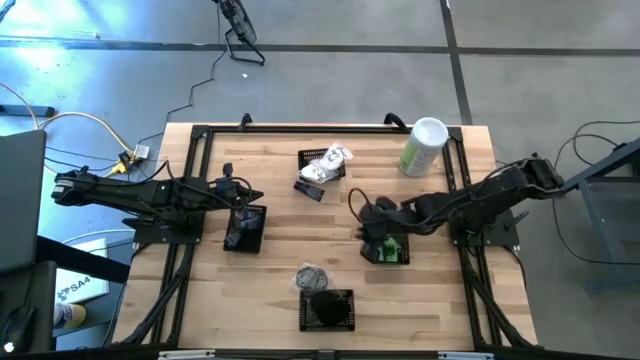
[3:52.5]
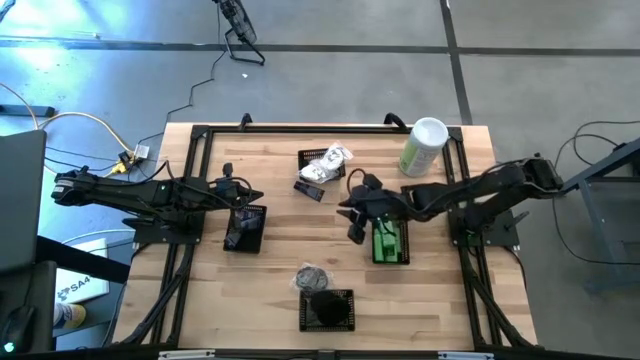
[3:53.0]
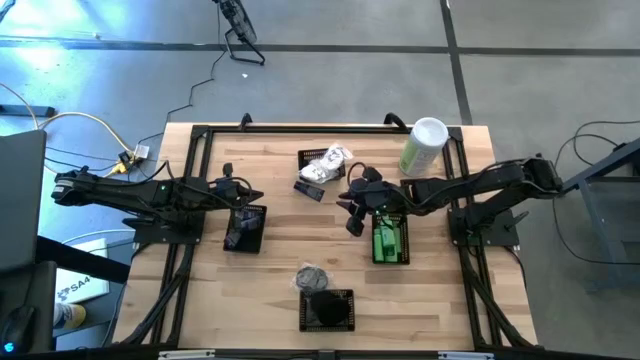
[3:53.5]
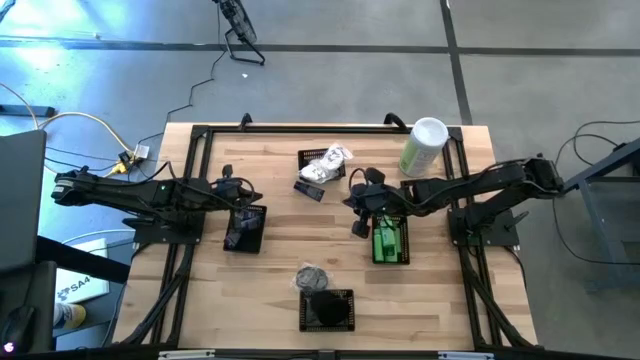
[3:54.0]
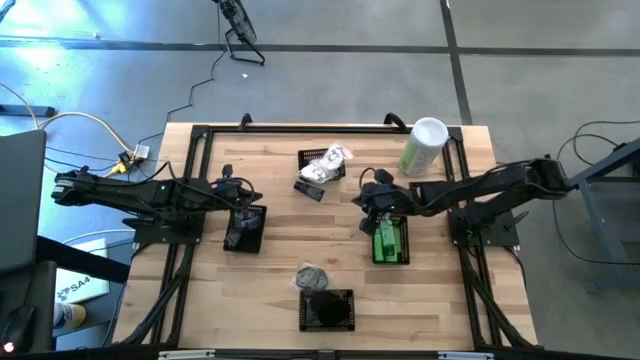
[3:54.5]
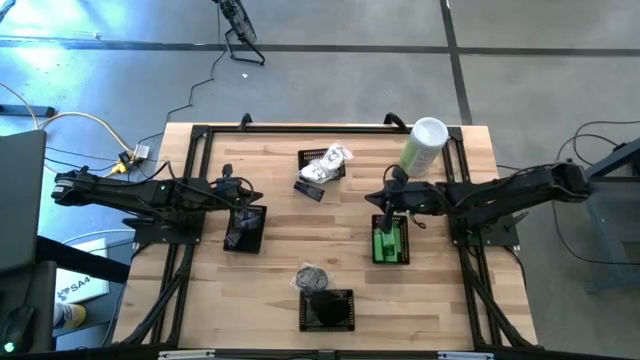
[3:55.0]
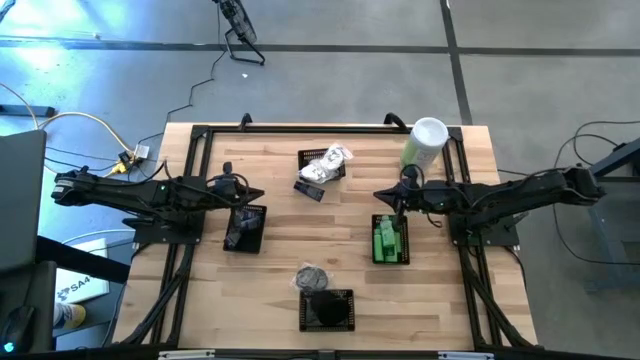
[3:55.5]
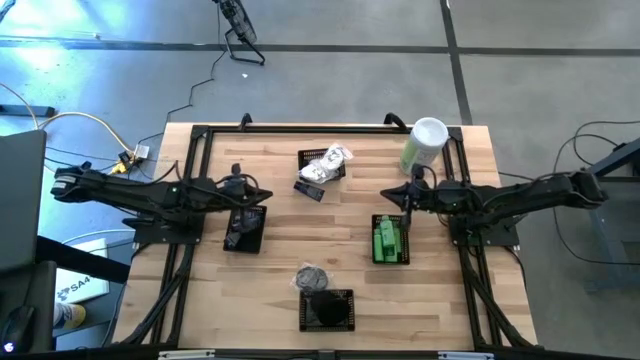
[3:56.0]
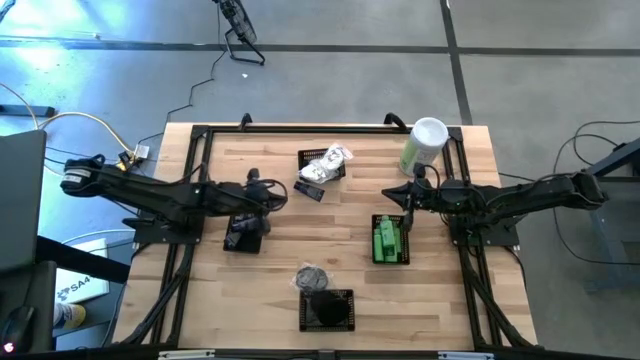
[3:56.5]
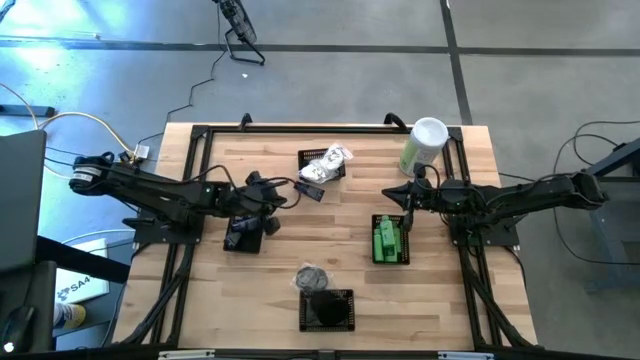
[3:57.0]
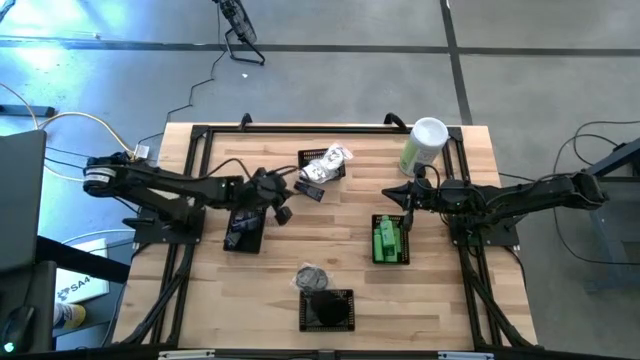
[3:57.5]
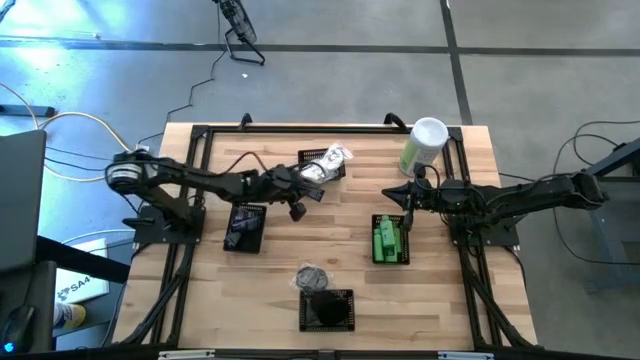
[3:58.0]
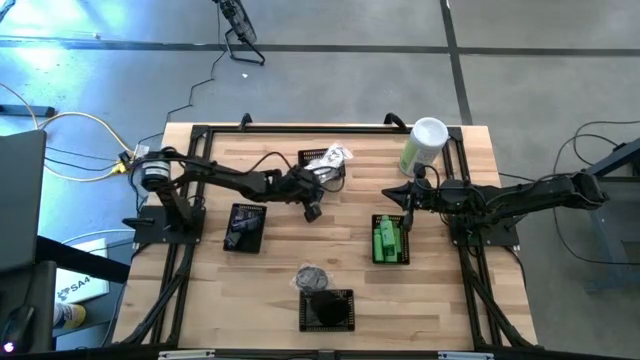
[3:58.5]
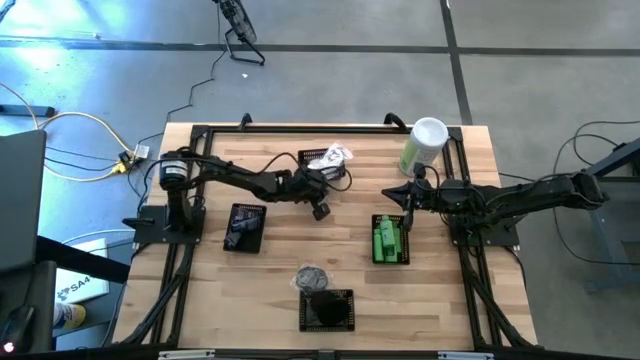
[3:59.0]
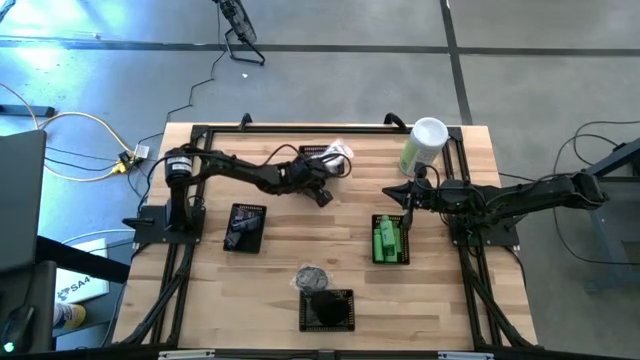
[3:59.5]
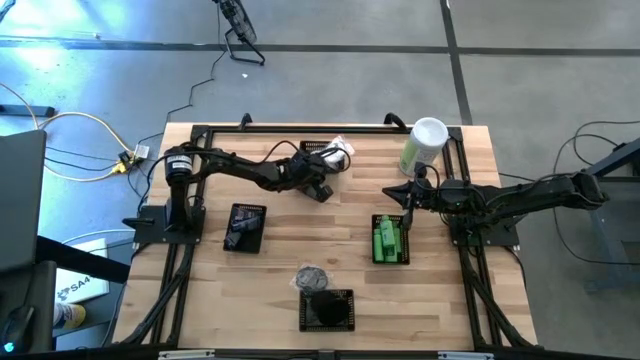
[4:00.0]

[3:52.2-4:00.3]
Task: Pick & Place Travel size toiletries
Adjust the top middle black bin on the table

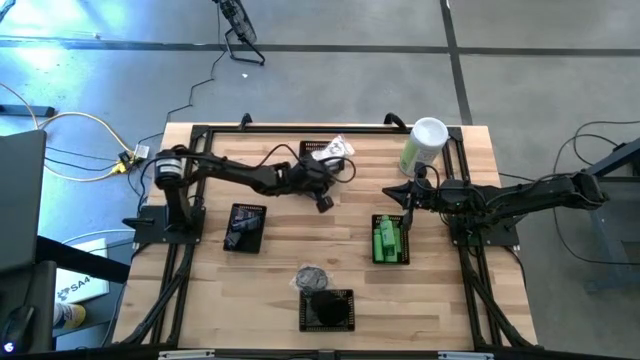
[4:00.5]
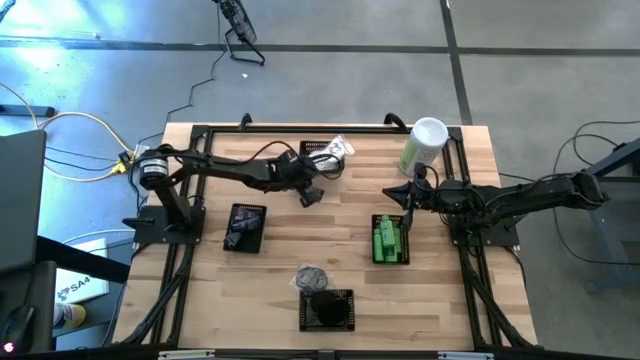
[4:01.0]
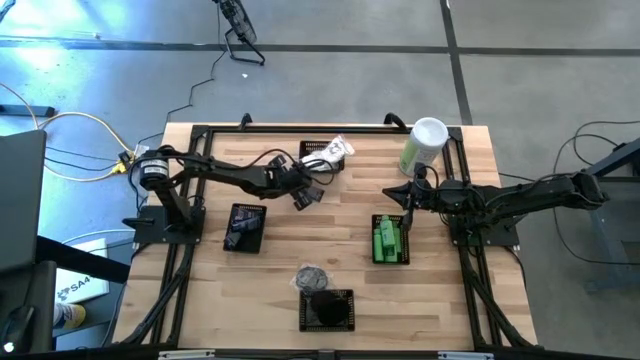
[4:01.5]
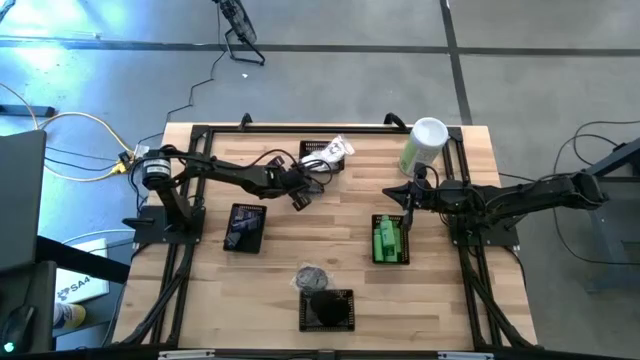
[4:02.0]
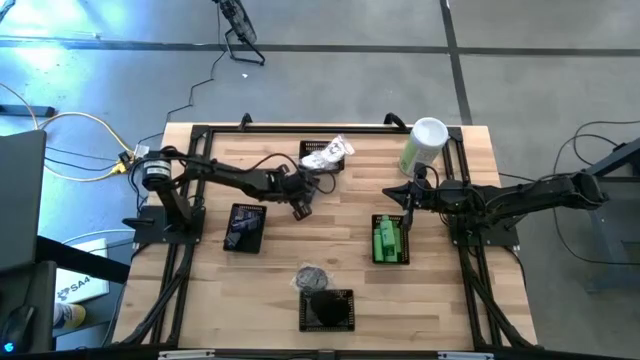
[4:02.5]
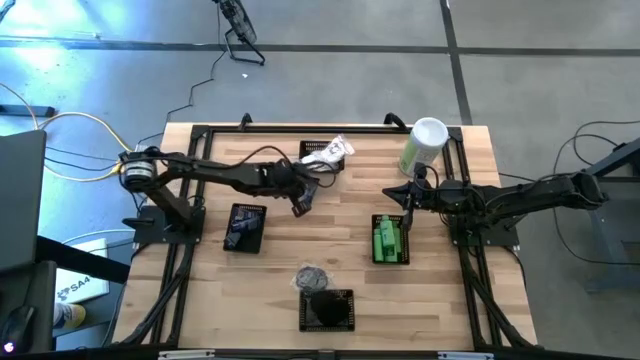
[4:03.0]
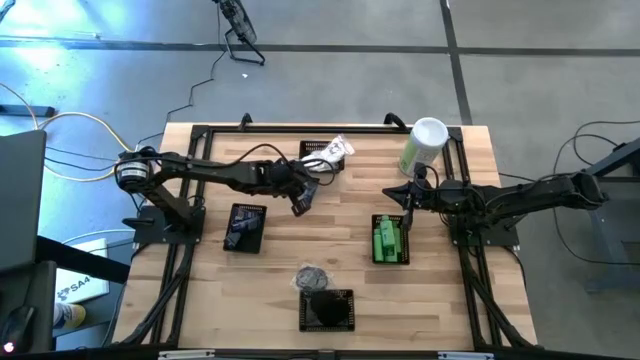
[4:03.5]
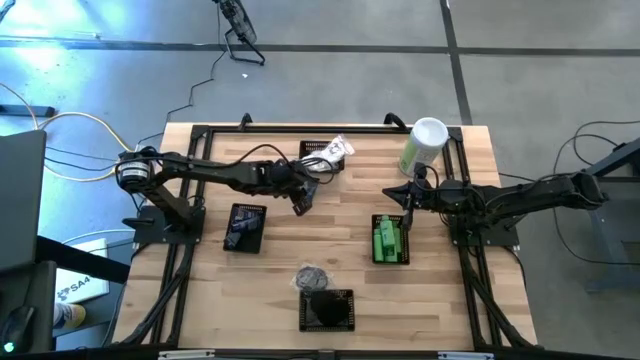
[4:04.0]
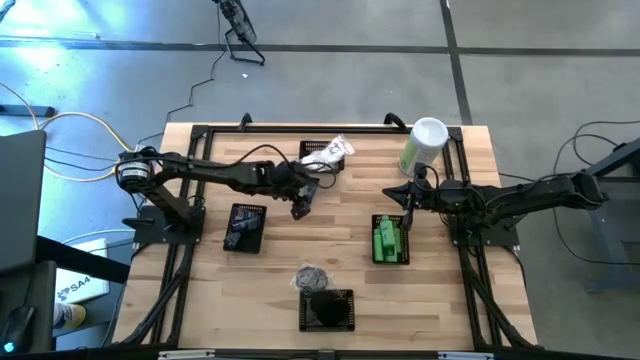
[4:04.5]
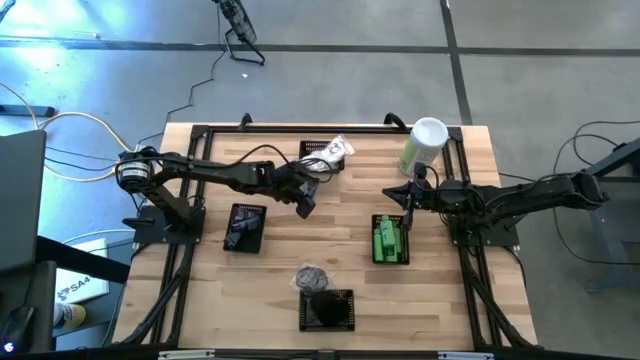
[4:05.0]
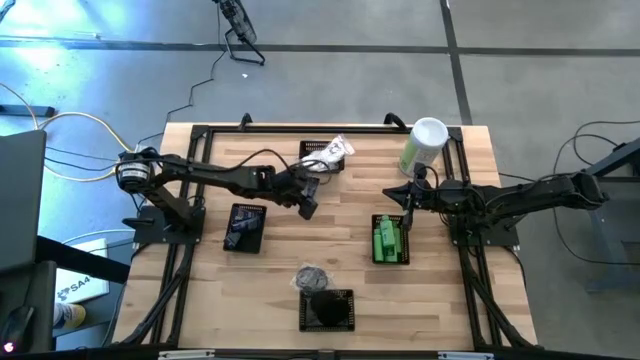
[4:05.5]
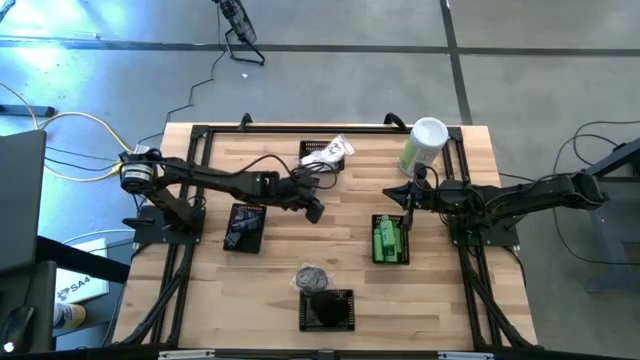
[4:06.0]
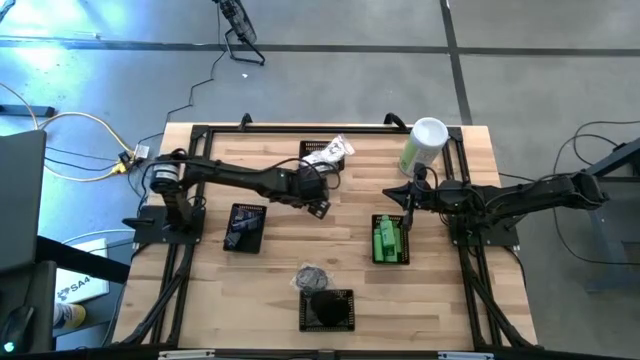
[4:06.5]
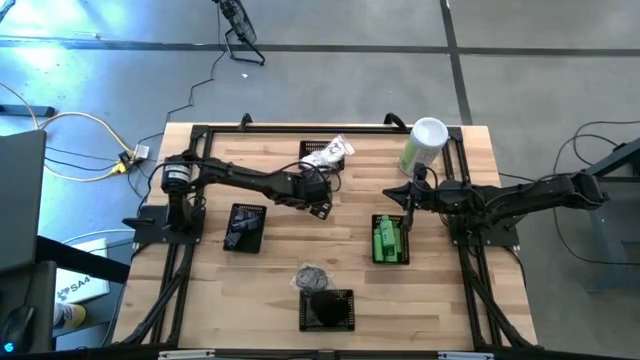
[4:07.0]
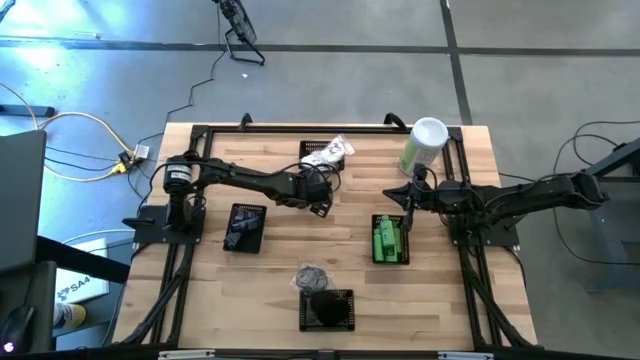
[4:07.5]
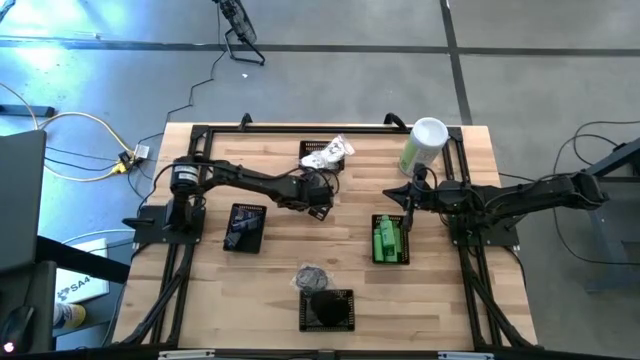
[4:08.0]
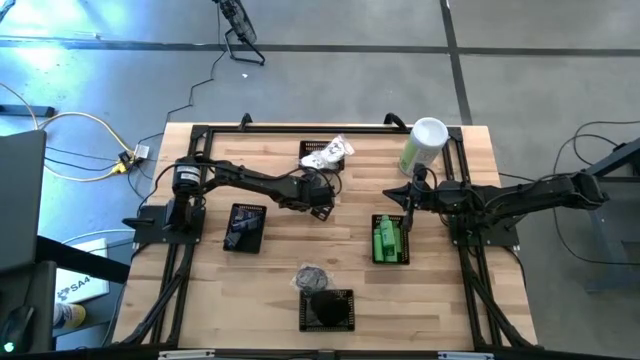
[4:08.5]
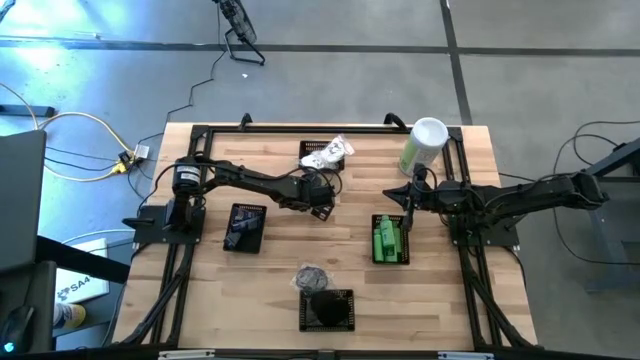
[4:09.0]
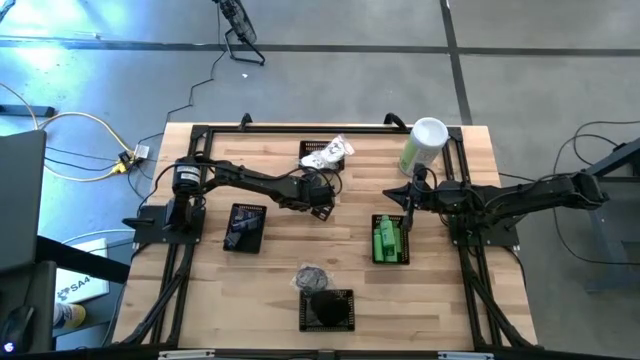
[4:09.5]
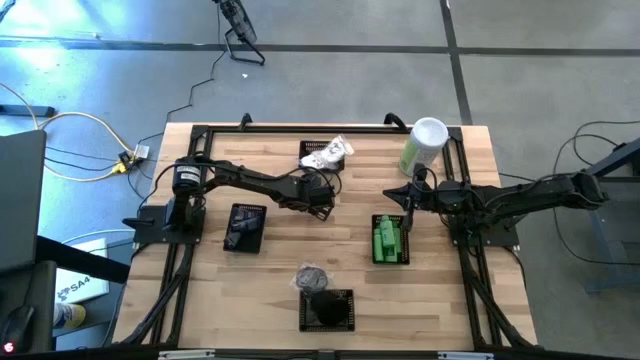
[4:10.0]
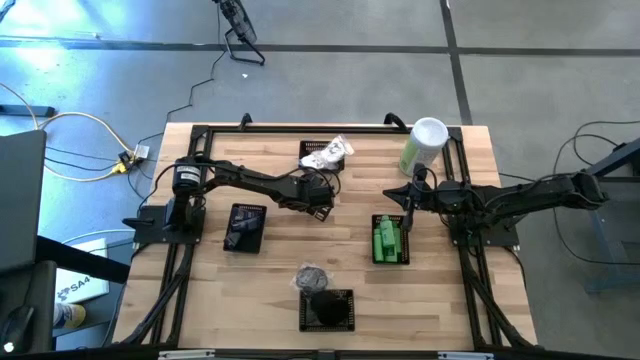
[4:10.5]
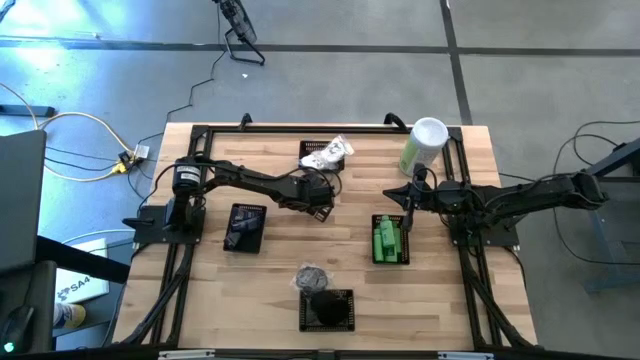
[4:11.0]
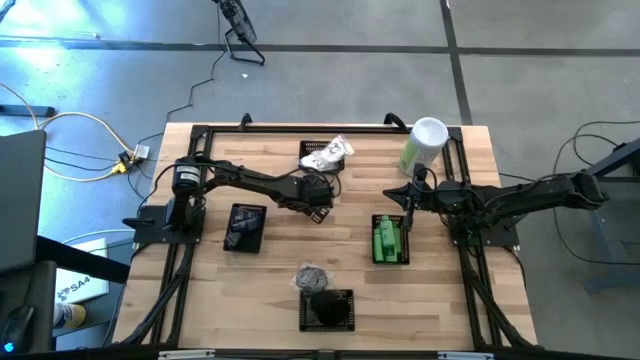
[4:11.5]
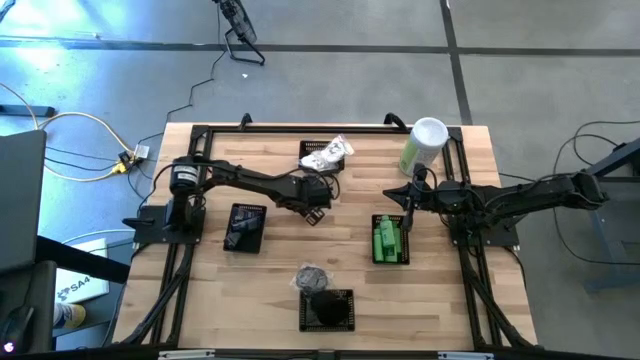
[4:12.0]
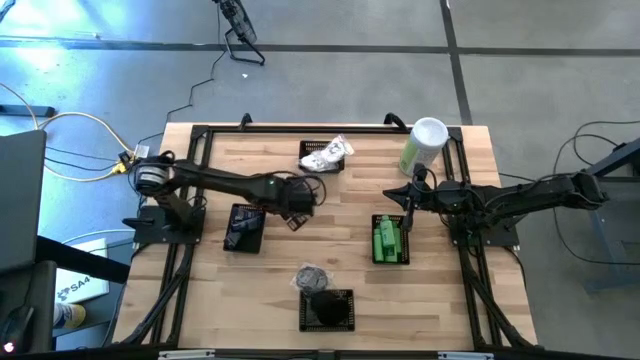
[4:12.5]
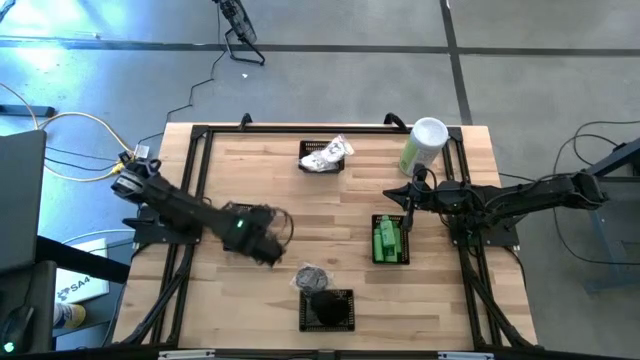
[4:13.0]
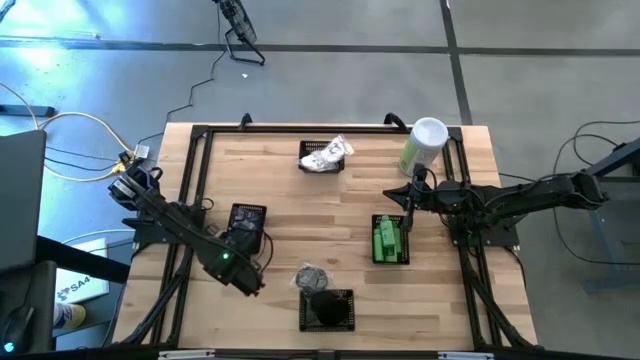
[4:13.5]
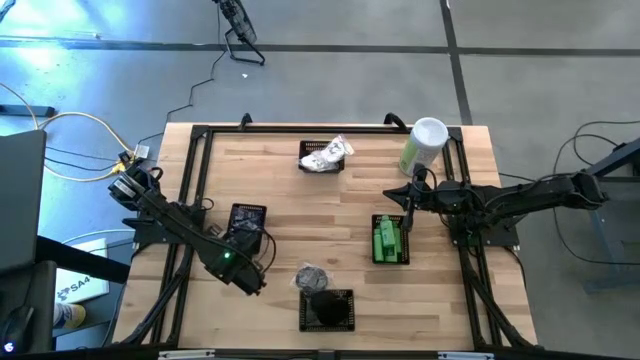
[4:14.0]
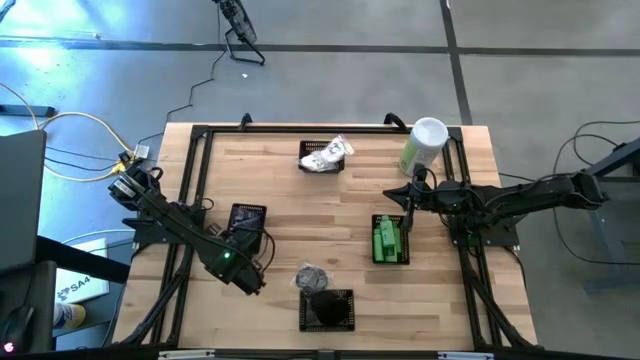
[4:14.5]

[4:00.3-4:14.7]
Put the blue bottle into the middle left black bin
